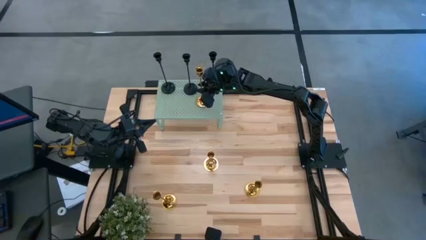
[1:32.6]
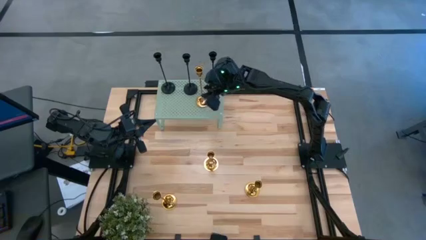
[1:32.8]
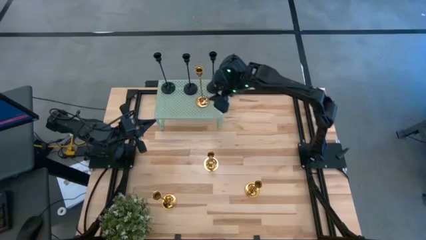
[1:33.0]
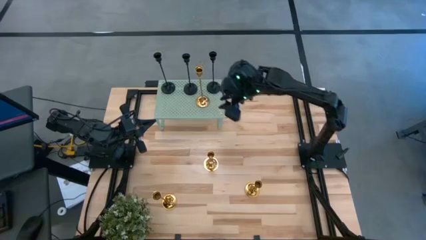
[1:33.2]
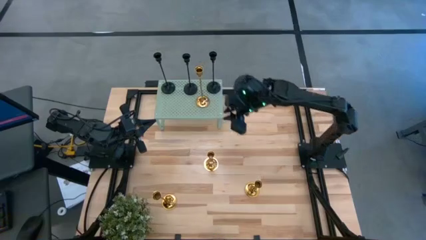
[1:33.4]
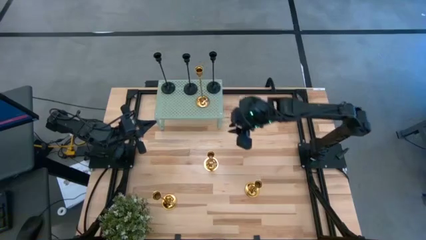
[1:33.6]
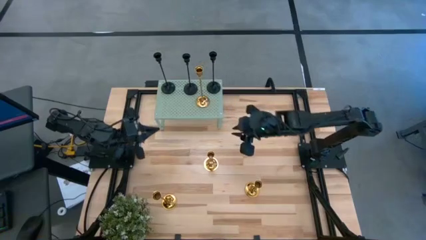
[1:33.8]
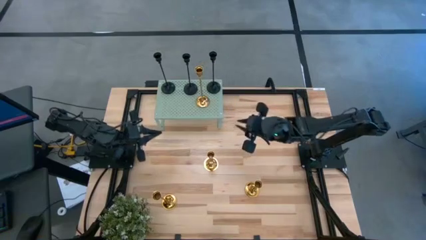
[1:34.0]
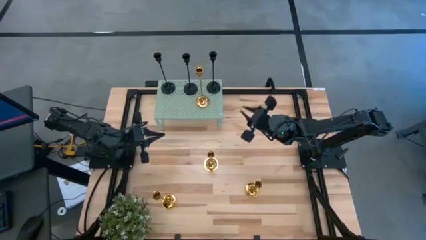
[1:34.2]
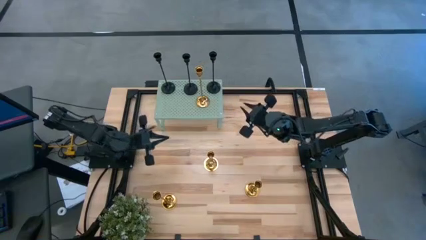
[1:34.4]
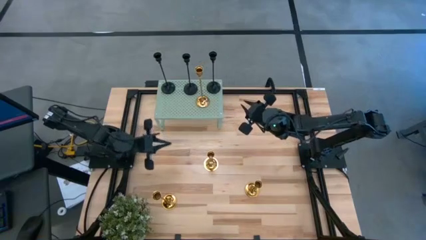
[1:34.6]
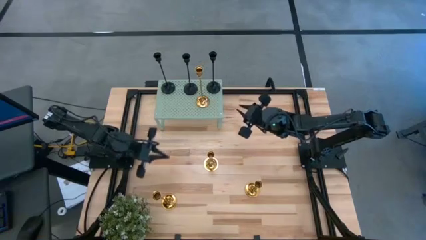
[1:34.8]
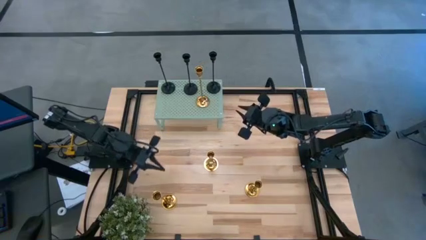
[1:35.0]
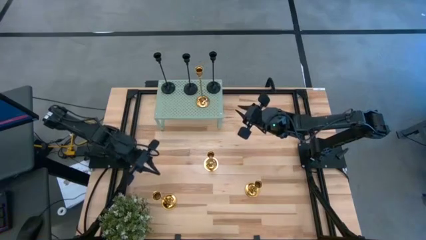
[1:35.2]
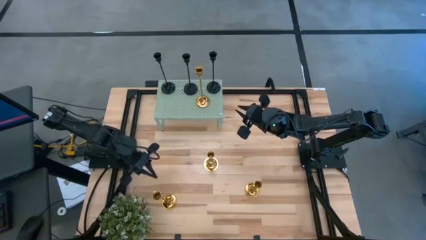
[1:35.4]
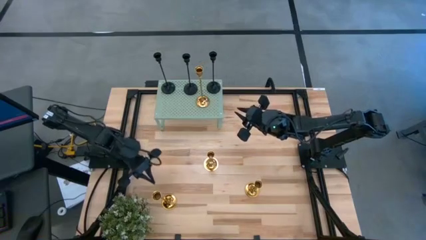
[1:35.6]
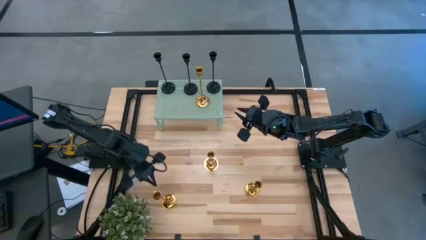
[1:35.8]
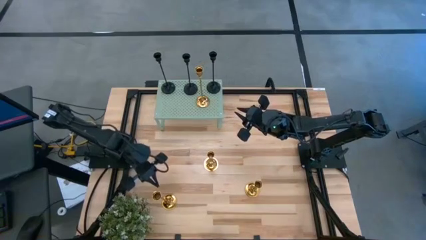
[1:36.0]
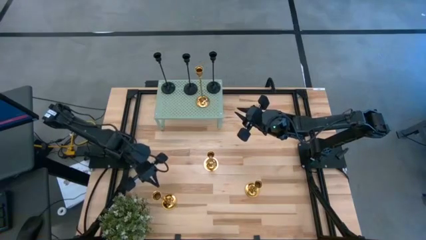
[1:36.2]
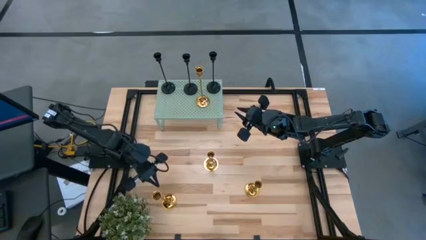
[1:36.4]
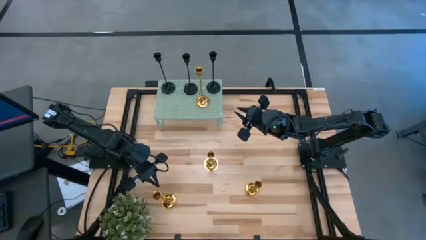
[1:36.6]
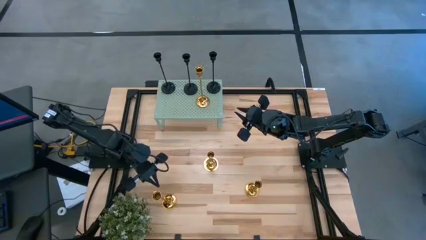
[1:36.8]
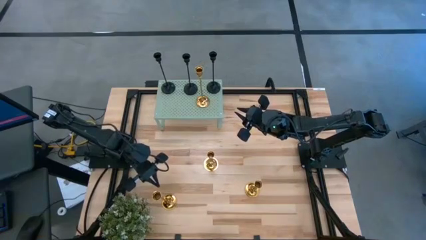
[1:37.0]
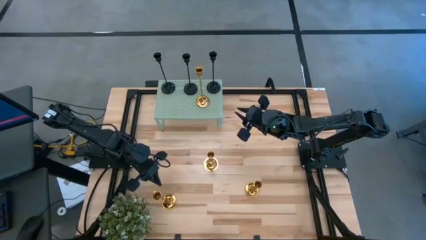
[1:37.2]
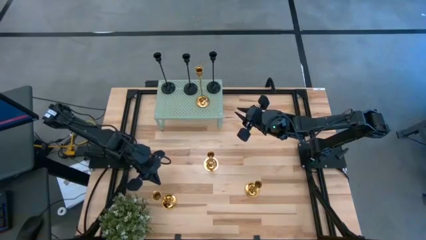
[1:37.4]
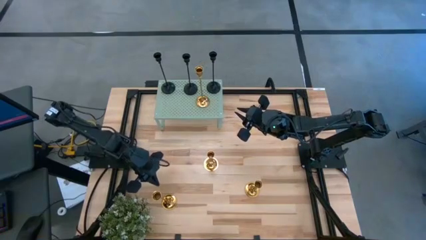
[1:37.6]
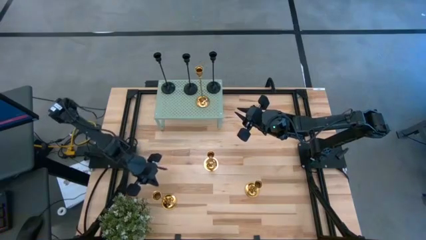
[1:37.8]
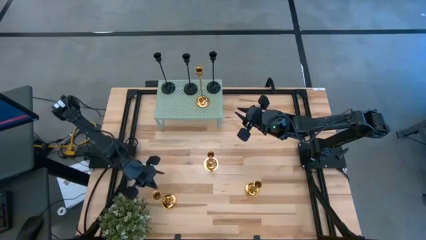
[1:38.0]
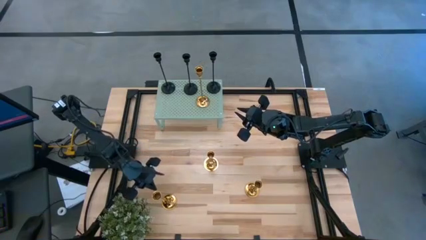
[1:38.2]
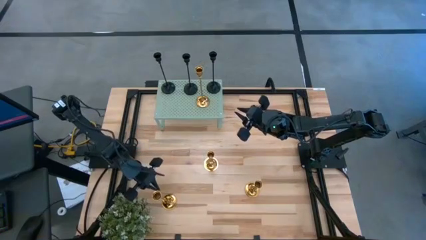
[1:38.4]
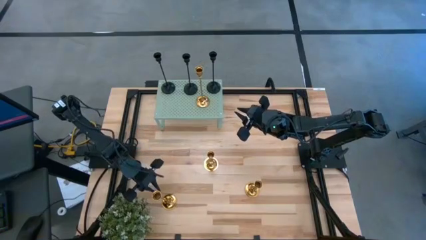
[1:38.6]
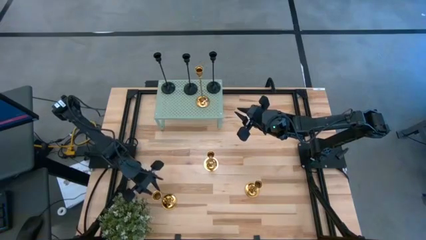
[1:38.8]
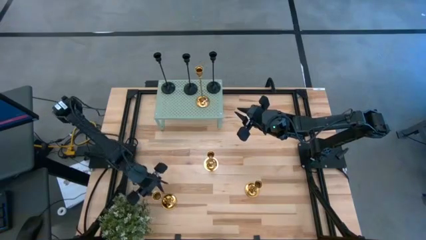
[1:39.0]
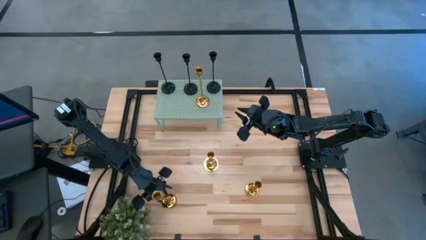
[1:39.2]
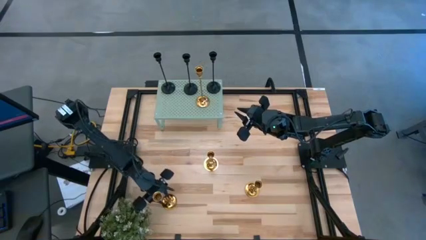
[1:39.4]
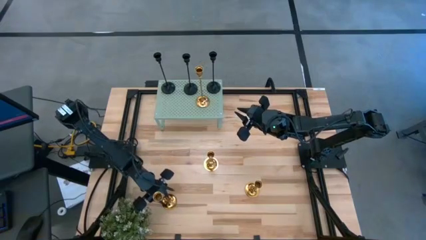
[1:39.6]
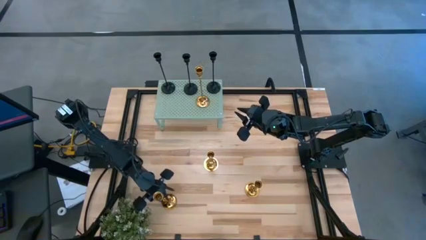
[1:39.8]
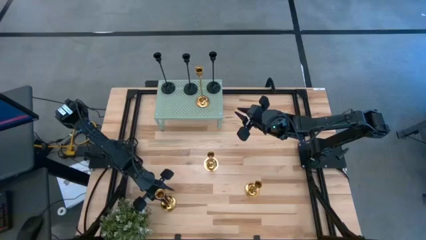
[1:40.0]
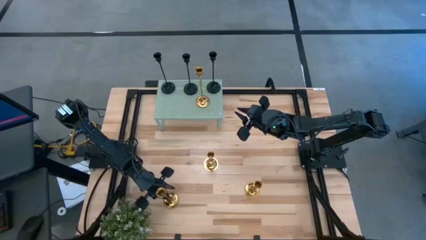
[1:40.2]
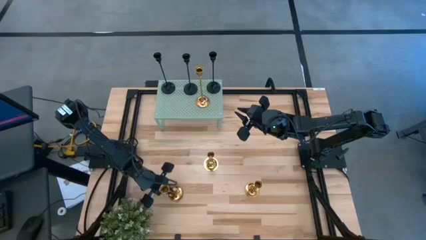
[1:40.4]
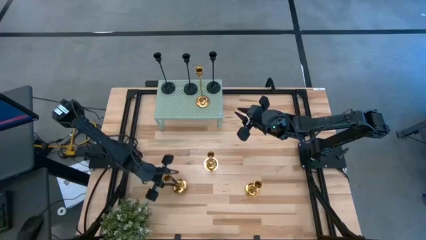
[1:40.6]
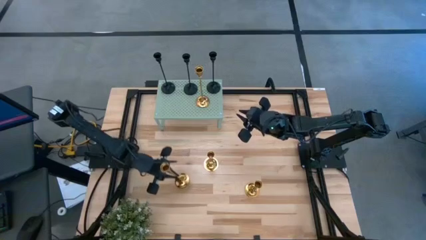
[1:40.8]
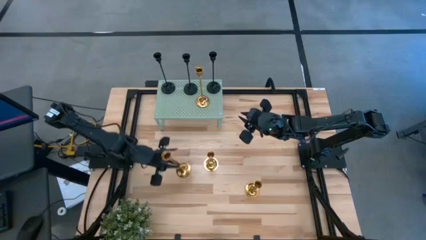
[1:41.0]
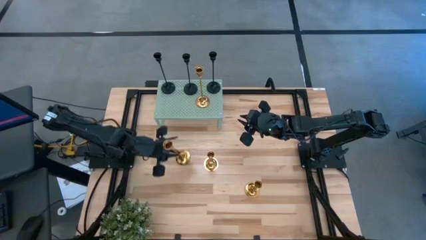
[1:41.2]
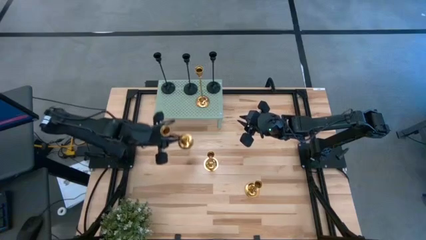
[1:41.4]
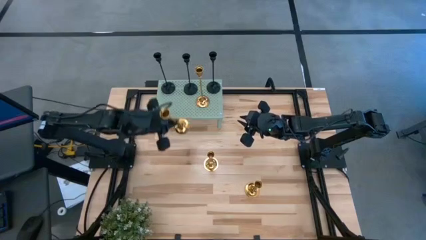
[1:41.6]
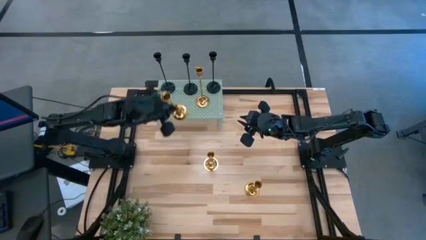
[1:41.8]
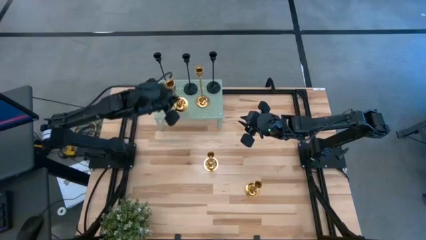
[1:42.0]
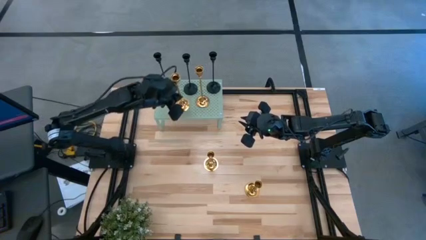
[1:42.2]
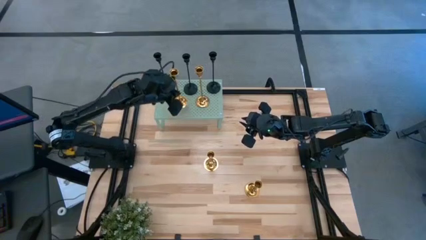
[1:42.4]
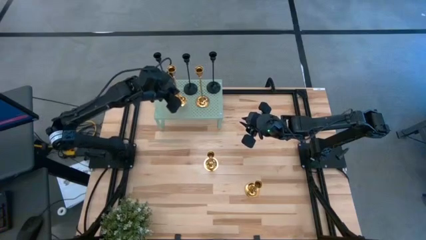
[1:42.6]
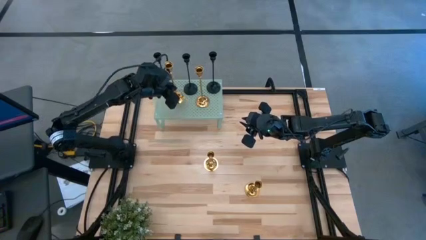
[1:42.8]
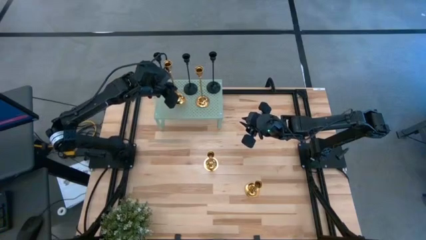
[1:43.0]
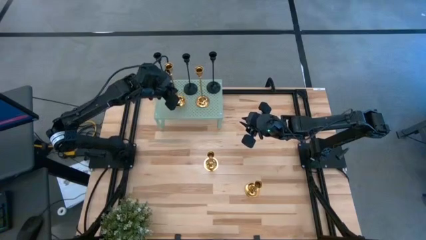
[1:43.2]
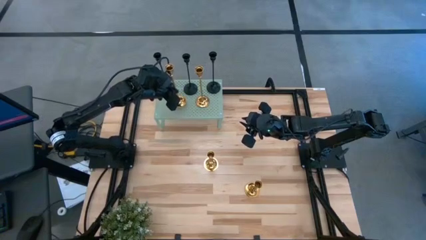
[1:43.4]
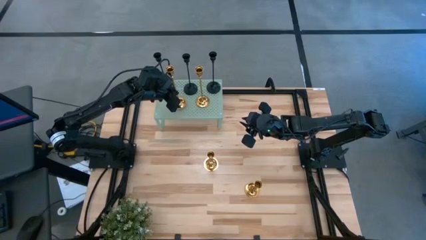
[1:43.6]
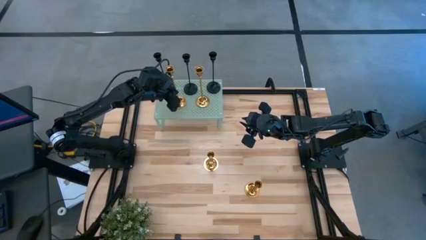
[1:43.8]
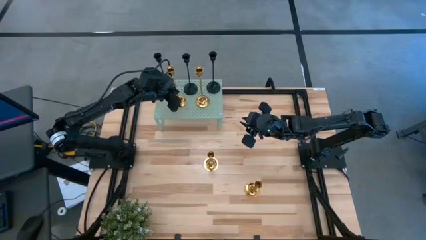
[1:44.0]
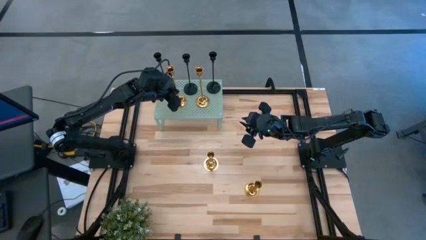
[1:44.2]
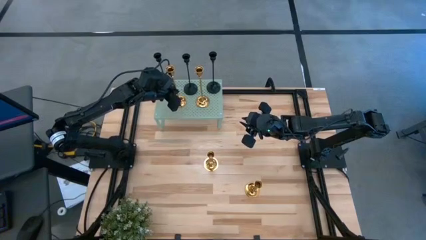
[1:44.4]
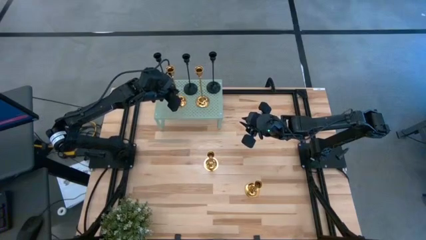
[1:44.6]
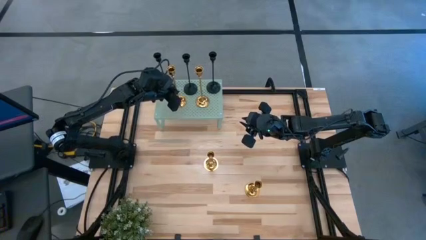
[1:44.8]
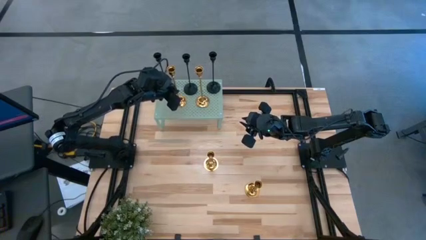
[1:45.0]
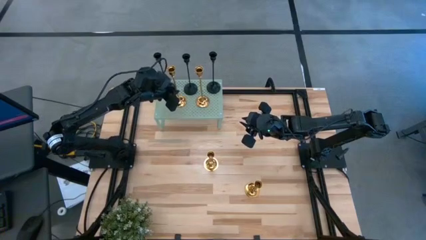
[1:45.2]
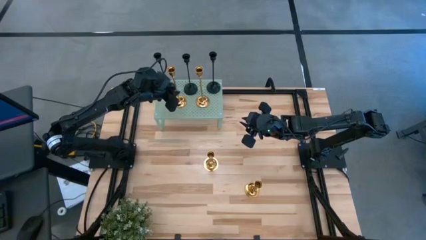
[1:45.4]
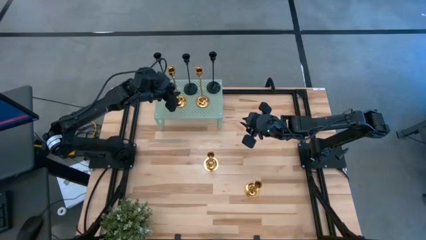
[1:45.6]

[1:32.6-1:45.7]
Task: Pick & Place candle stick holders
Put the gold candle holder on the shelf

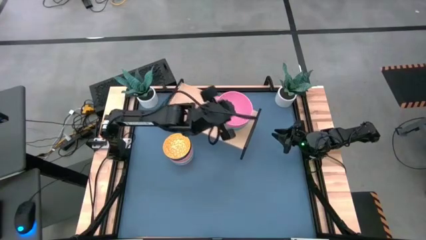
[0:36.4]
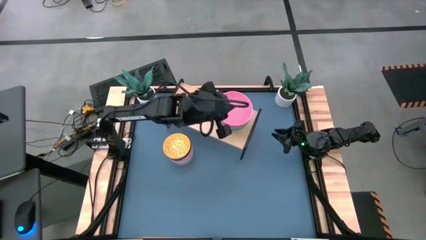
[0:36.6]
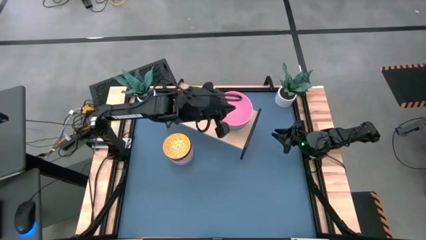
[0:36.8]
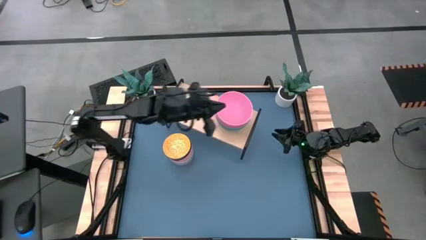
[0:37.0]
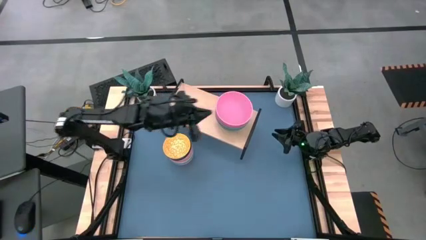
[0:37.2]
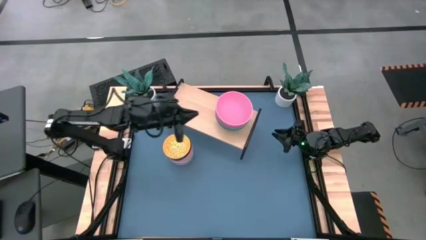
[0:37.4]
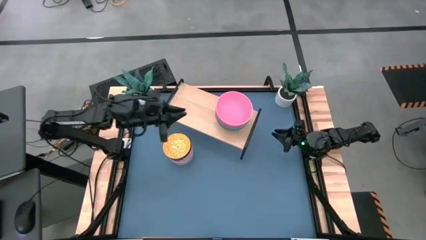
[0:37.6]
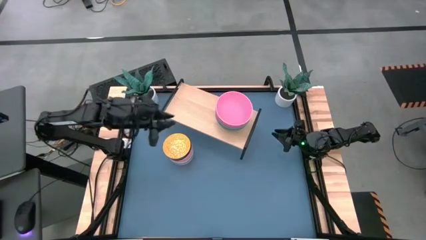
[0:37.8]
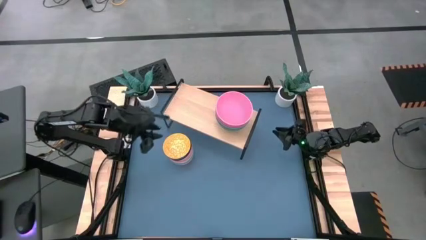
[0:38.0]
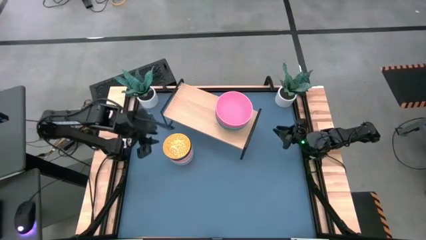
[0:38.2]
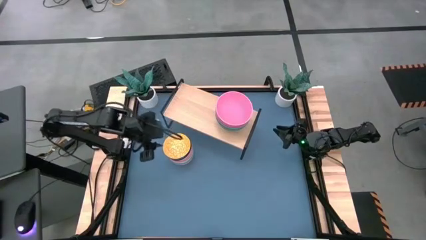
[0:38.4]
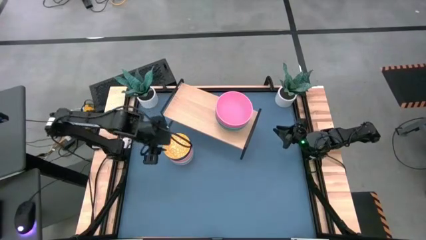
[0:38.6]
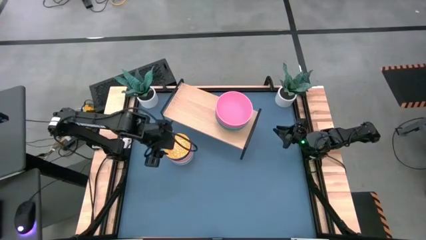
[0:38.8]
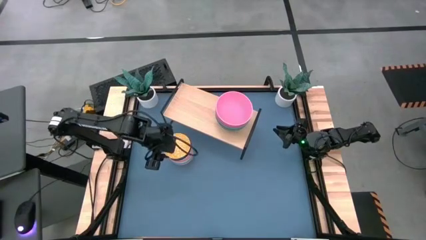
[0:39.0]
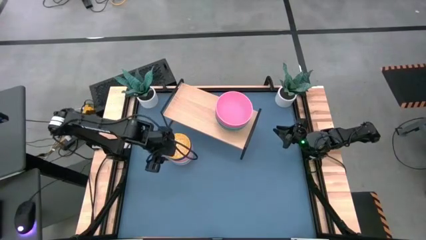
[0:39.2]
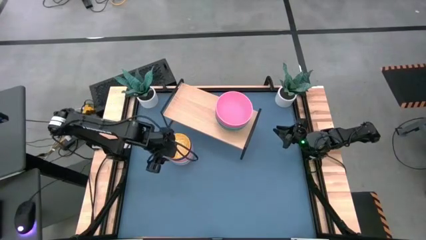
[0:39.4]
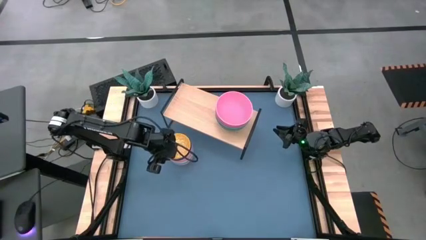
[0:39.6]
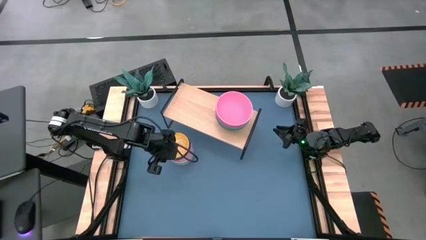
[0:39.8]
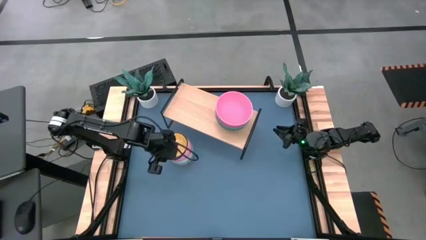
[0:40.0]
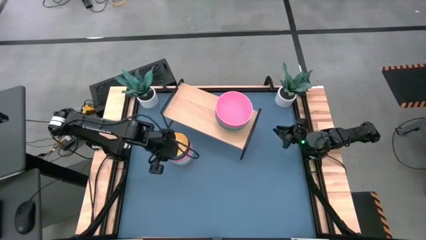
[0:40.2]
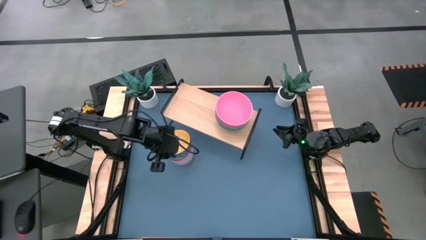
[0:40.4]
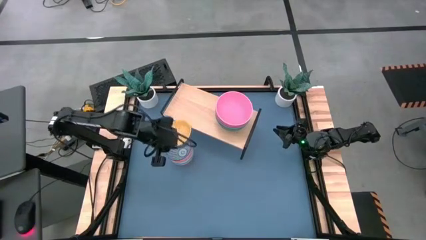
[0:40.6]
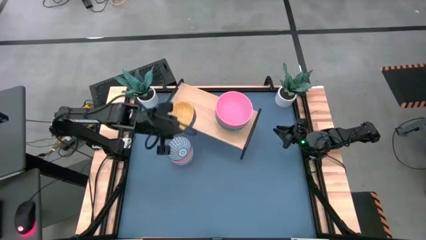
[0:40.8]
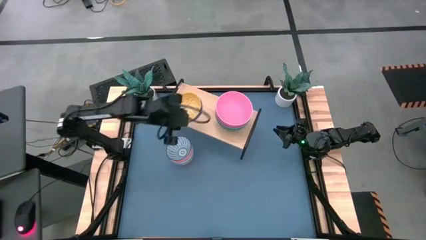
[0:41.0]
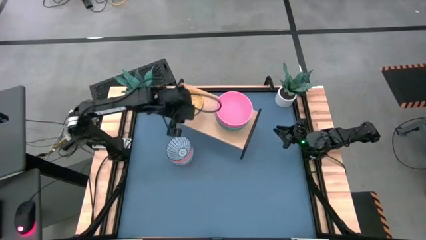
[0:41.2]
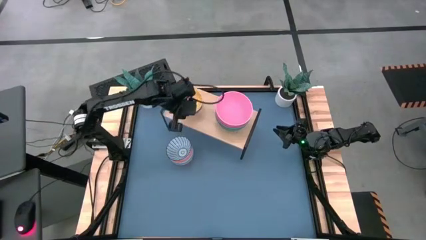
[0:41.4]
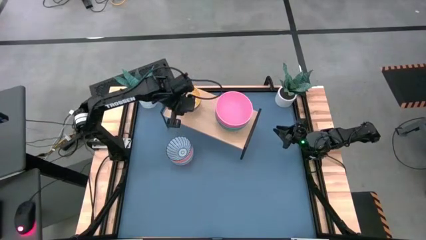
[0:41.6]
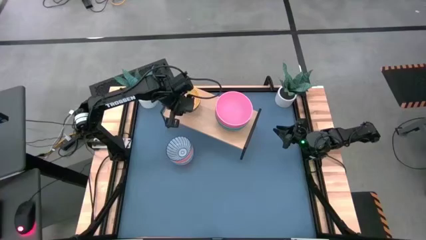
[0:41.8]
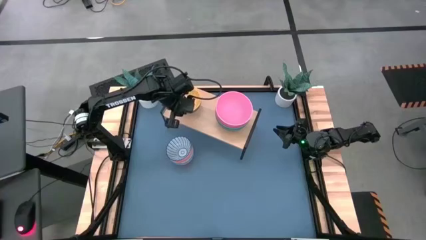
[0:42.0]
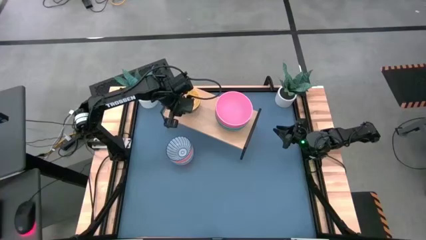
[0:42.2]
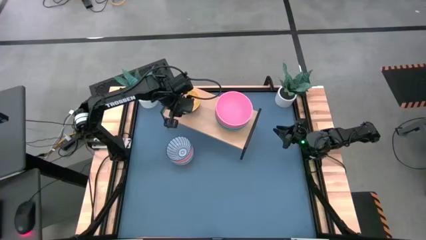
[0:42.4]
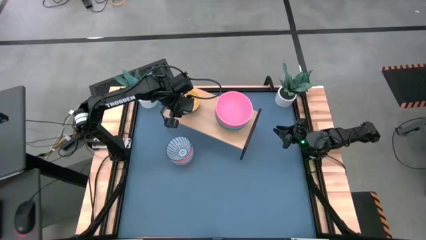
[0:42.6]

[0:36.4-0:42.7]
Task: Place and stack bowls onto a shelf
Put the printed yellow bowl on the shelf
